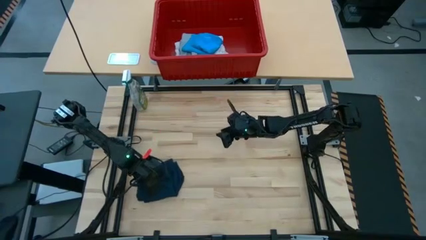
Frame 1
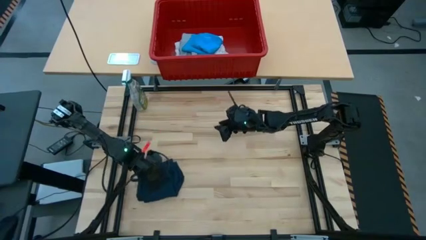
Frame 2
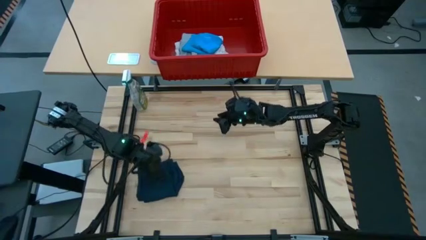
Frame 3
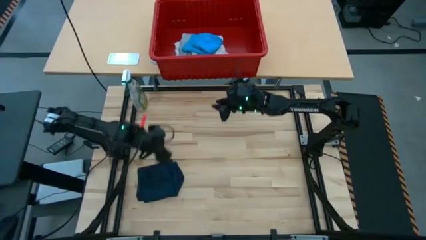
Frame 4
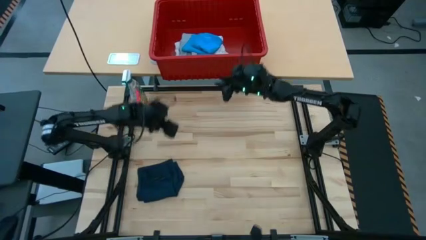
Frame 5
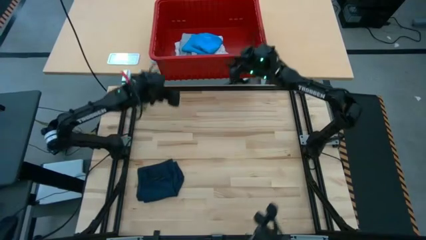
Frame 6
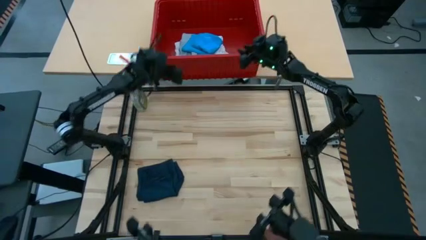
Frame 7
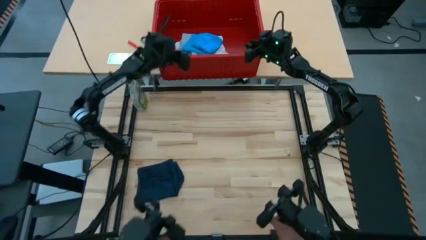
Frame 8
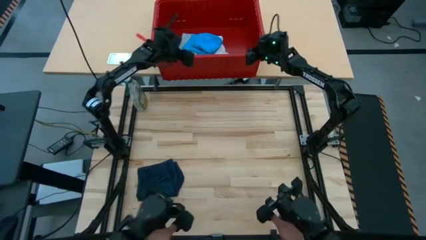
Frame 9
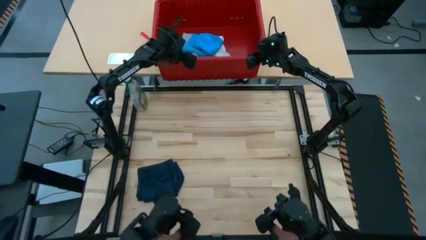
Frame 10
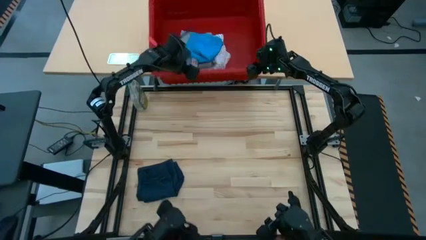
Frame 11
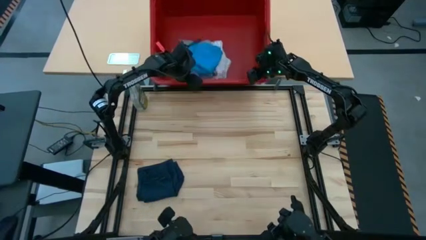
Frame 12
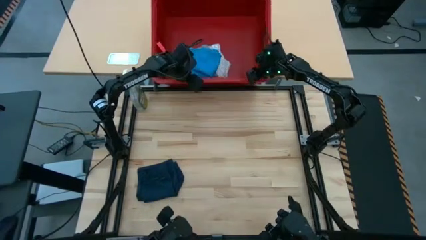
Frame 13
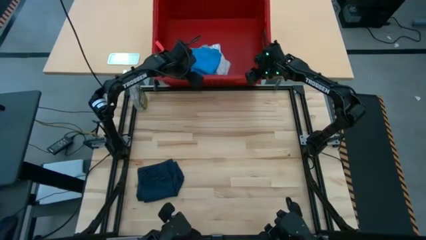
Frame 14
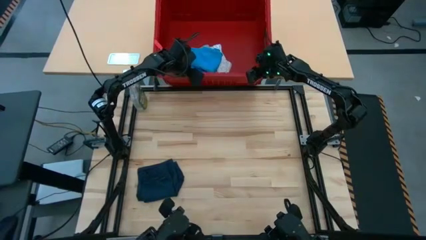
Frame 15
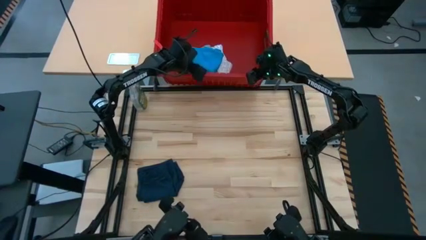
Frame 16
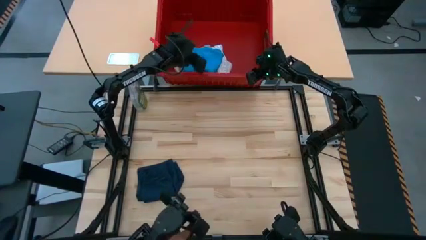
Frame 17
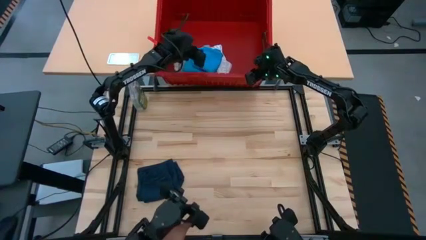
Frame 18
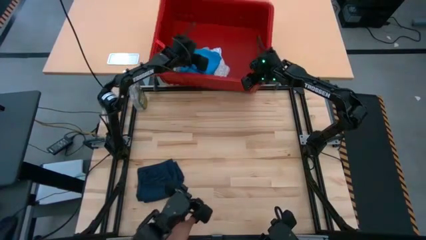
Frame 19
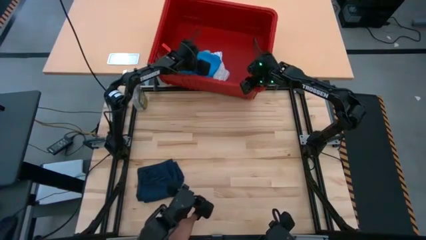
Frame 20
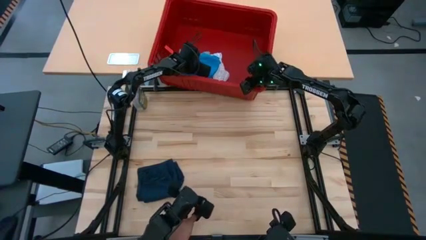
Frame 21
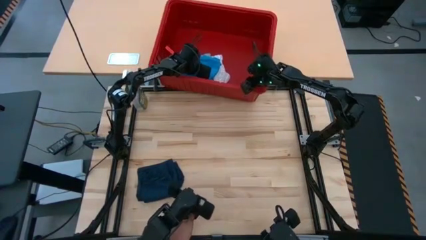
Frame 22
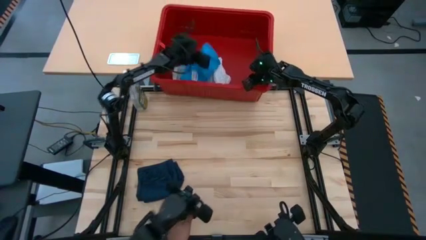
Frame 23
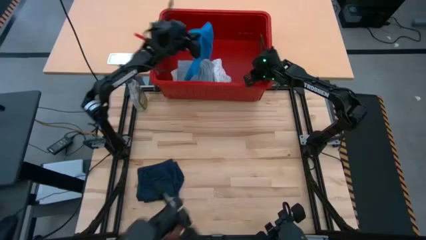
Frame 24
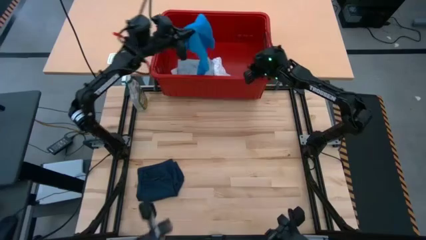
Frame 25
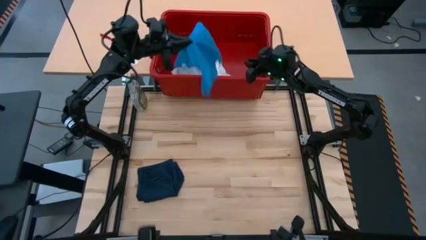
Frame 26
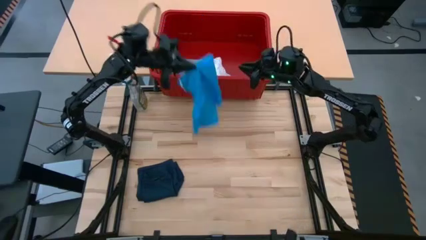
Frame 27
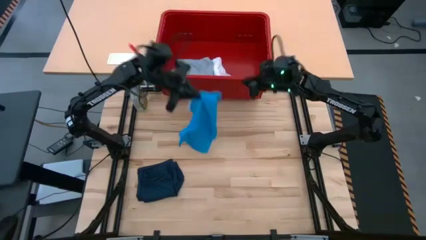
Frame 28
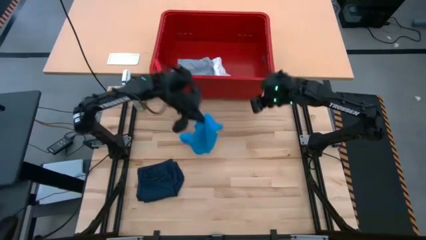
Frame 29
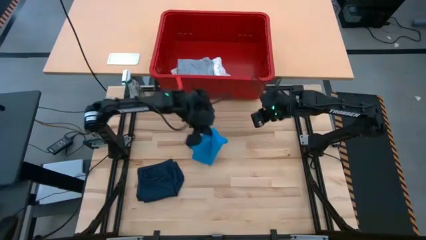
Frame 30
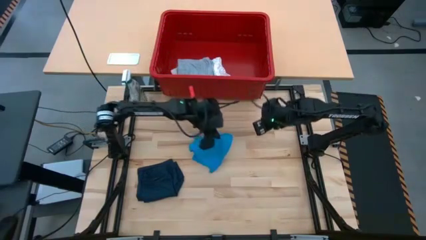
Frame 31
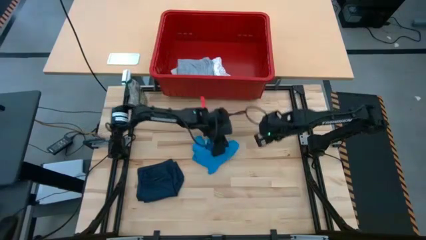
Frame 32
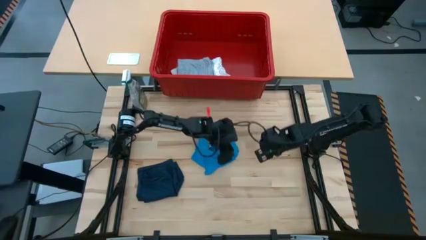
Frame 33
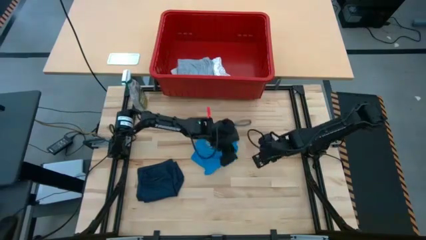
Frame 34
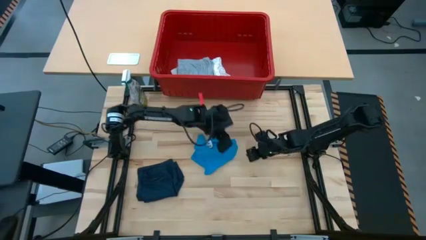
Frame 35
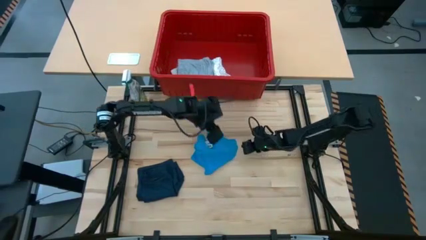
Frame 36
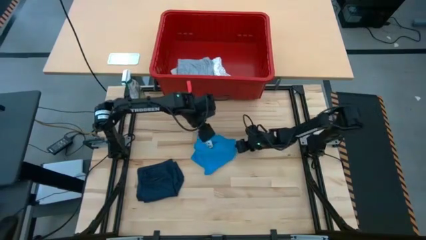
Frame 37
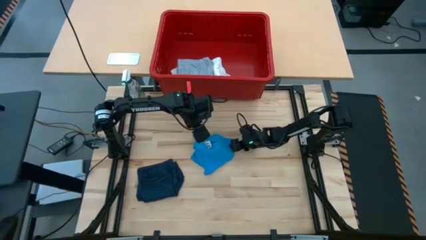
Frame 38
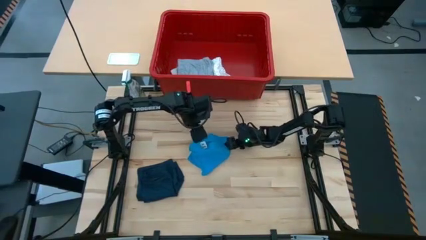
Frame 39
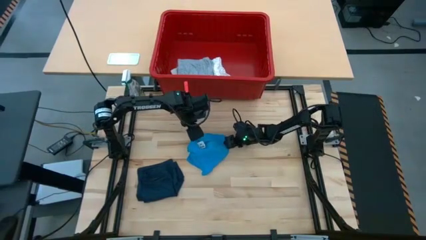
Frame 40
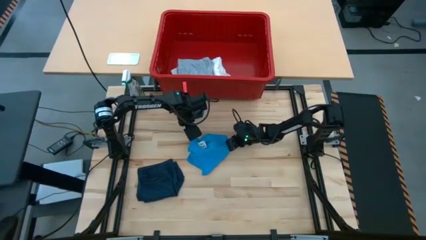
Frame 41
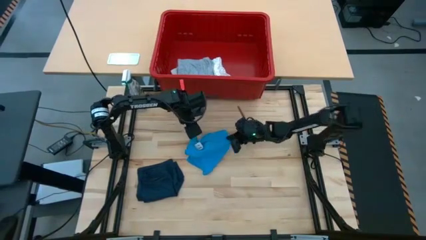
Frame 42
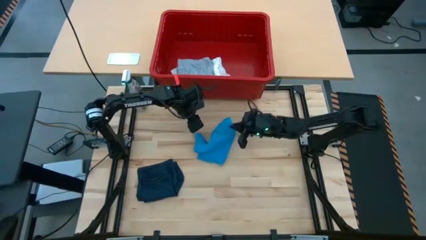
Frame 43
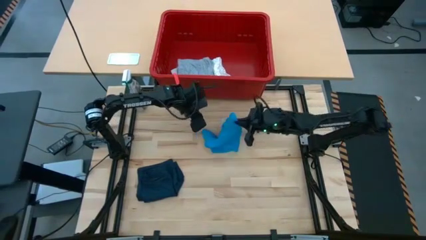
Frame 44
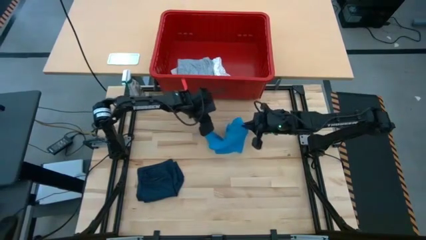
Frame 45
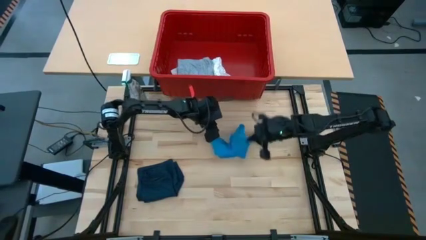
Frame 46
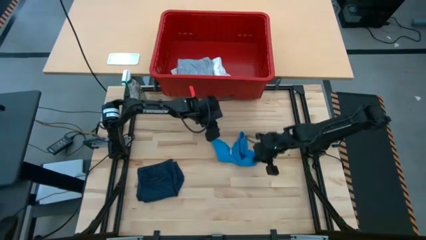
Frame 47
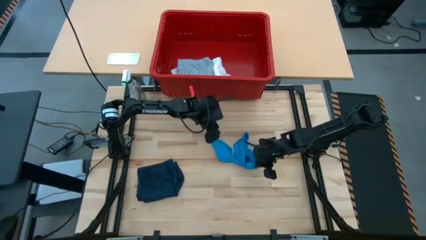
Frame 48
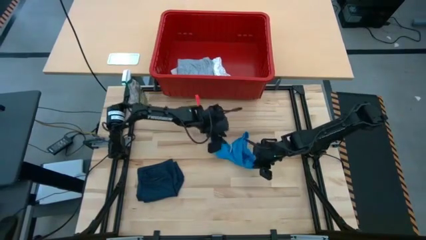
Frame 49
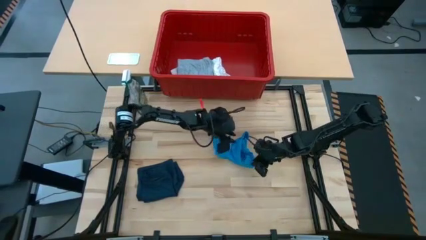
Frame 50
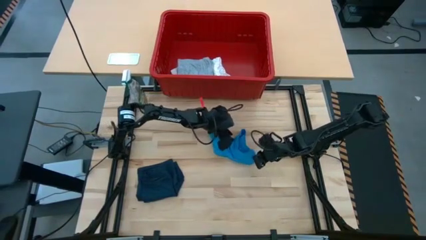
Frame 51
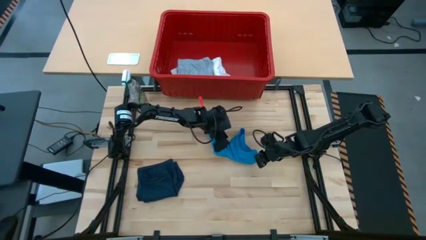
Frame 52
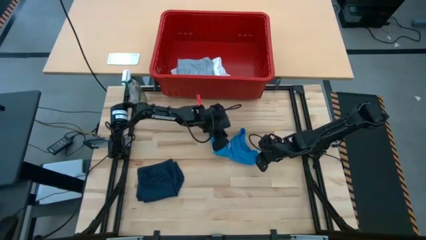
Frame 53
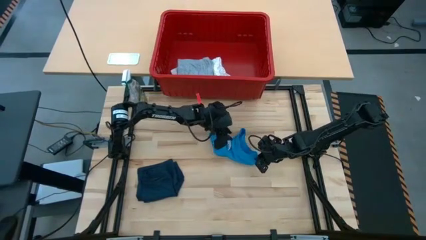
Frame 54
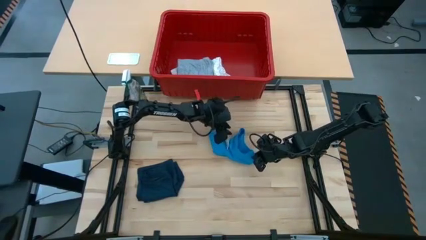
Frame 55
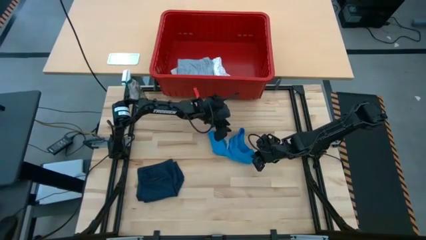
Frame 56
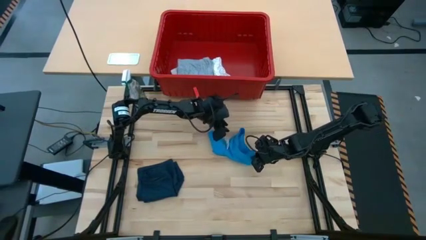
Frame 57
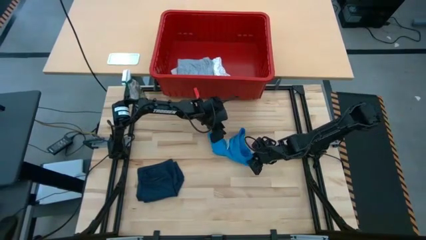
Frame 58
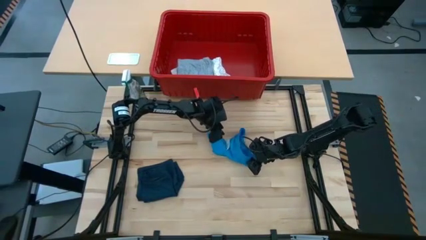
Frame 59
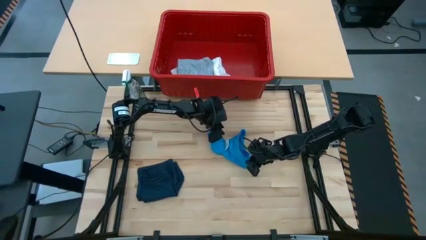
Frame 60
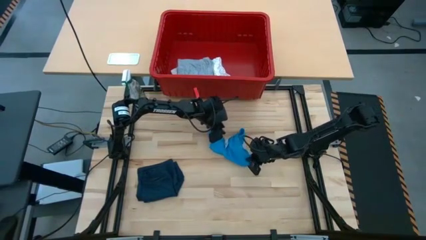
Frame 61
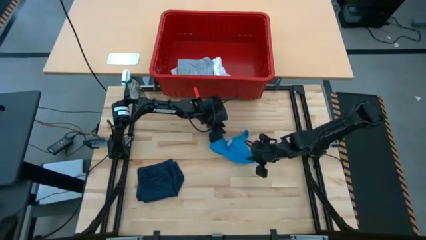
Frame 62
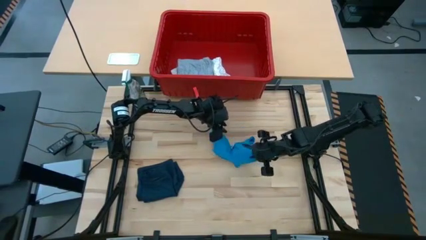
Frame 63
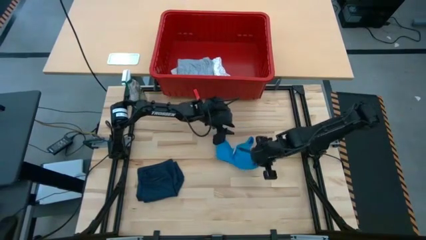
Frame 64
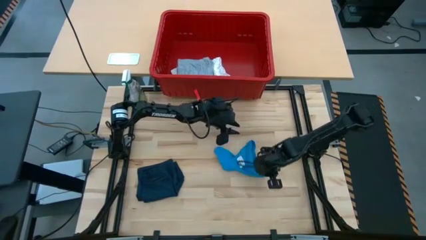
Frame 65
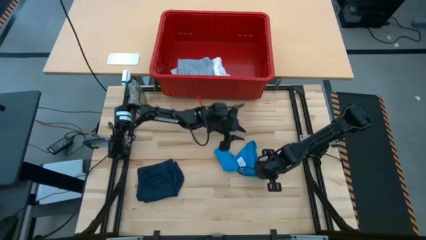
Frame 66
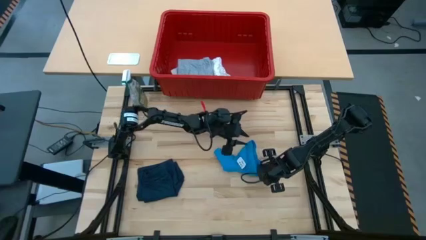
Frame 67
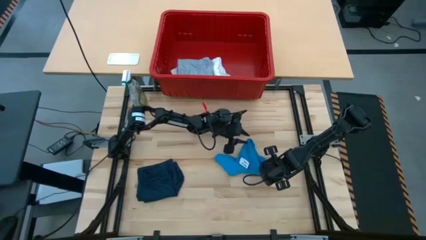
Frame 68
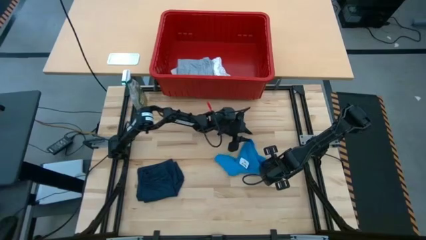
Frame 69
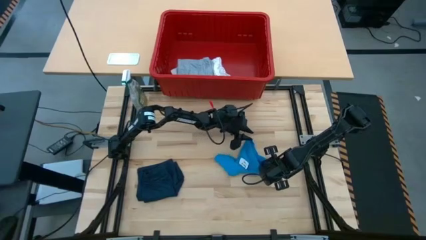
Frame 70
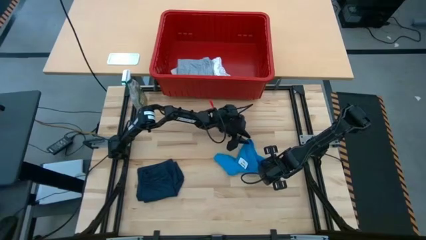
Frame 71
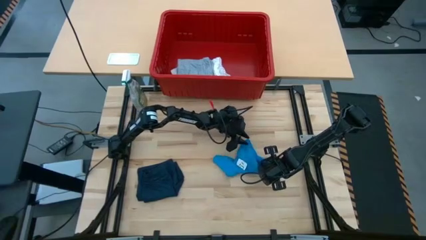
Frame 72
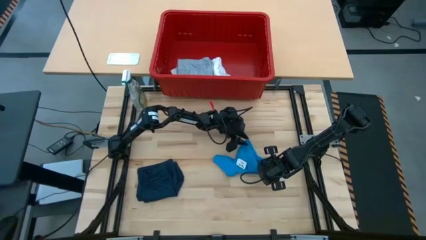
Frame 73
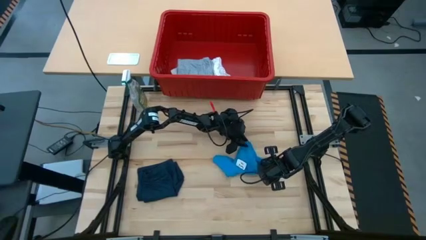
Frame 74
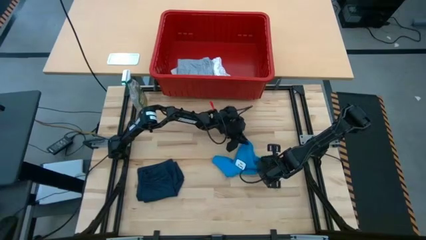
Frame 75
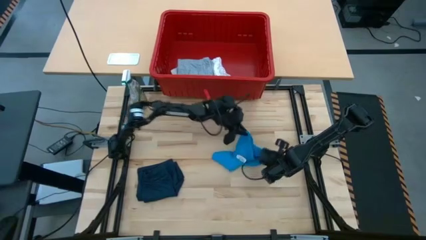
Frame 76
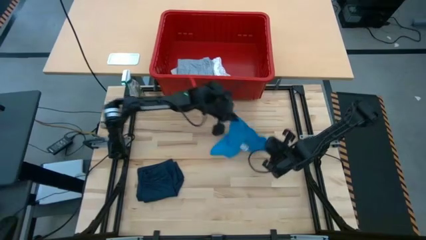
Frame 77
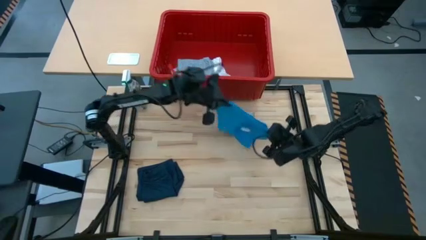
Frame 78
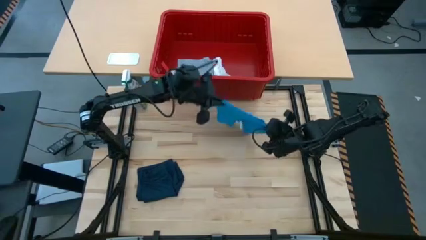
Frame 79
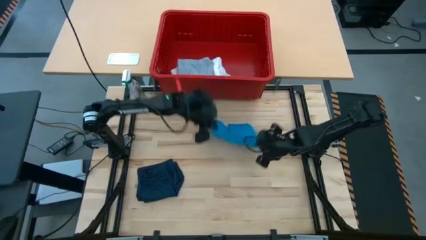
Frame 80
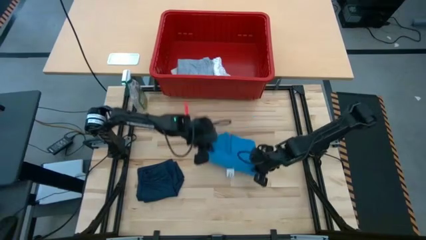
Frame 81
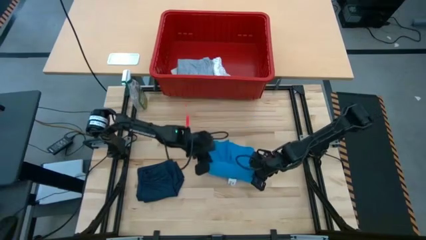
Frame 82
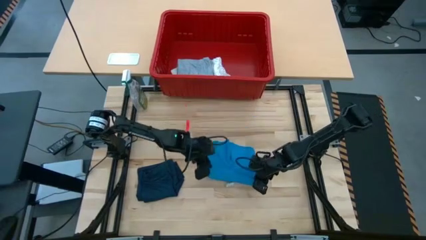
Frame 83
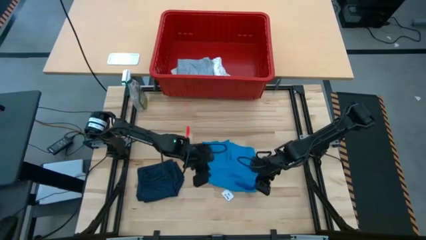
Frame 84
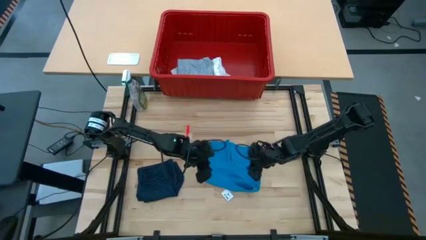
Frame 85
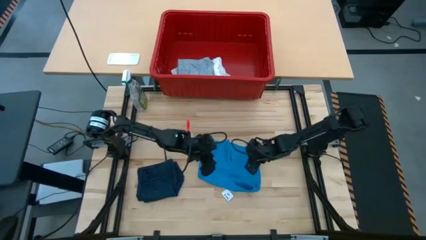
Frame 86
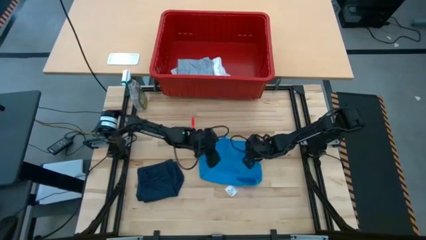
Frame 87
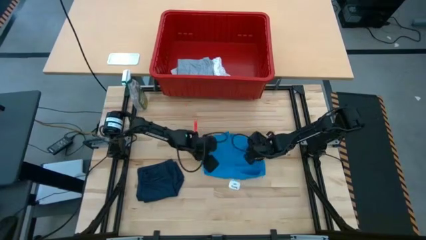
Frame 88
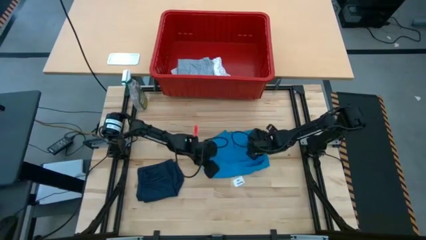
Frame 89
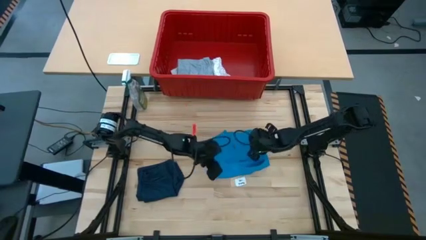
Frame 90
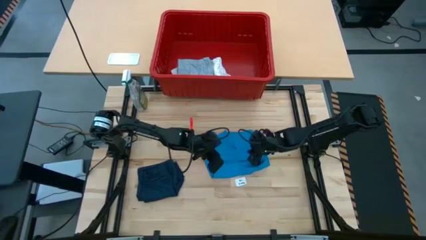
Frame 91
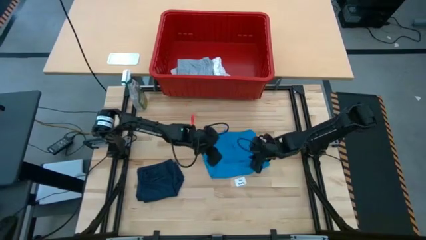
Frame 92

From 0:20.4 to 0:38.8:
Task: Fold laundry
Fold the light blue shorts
